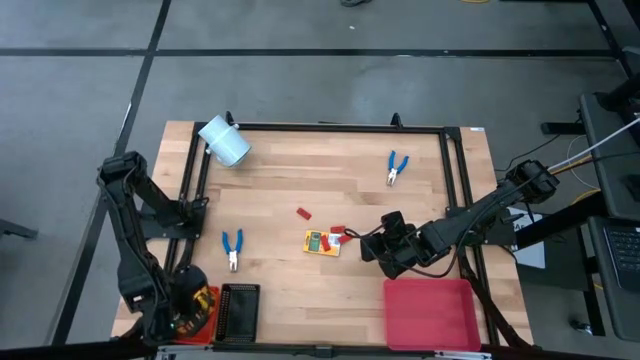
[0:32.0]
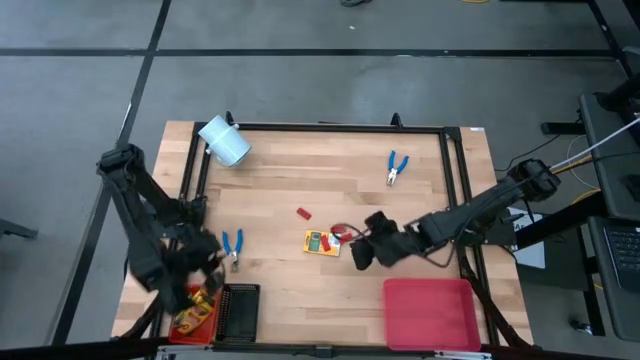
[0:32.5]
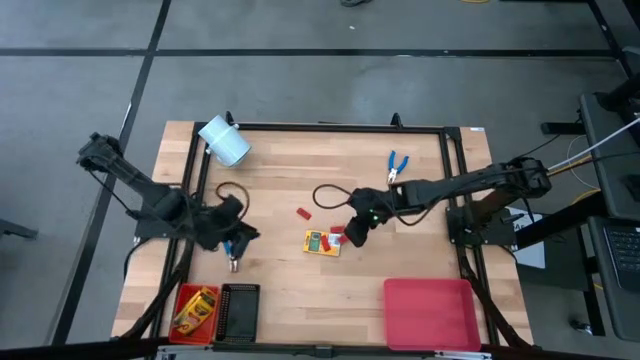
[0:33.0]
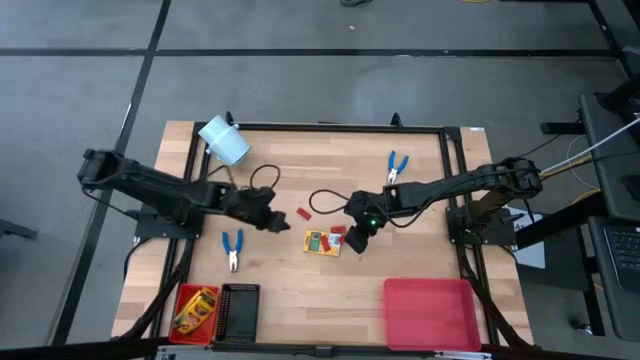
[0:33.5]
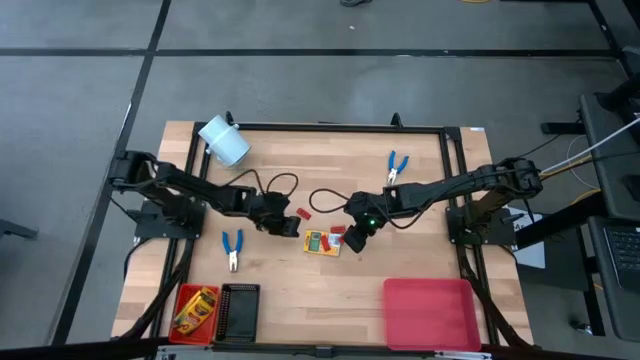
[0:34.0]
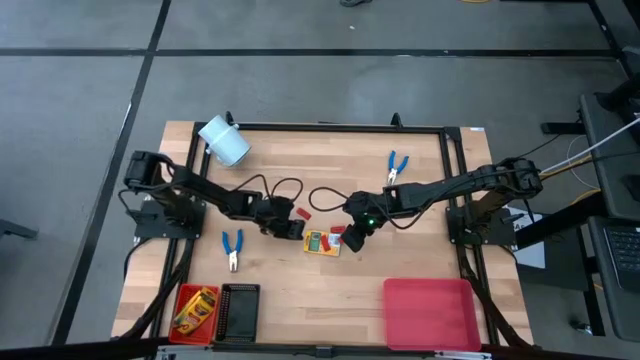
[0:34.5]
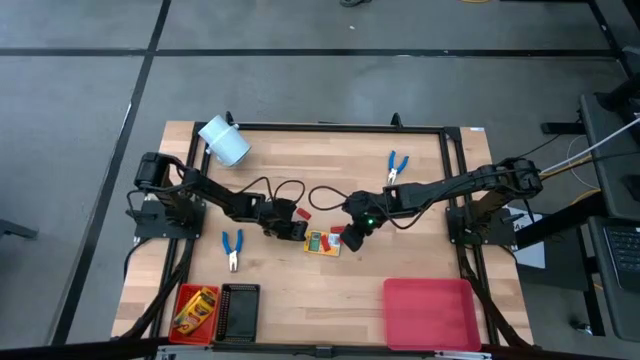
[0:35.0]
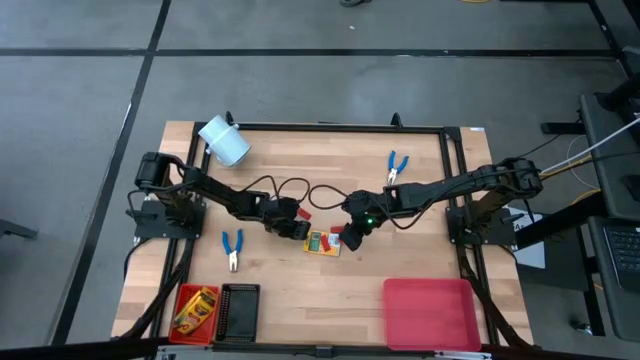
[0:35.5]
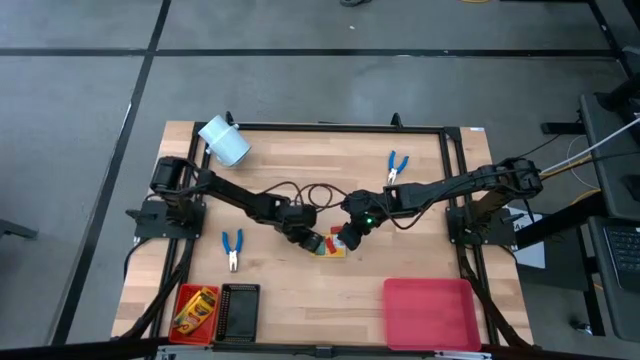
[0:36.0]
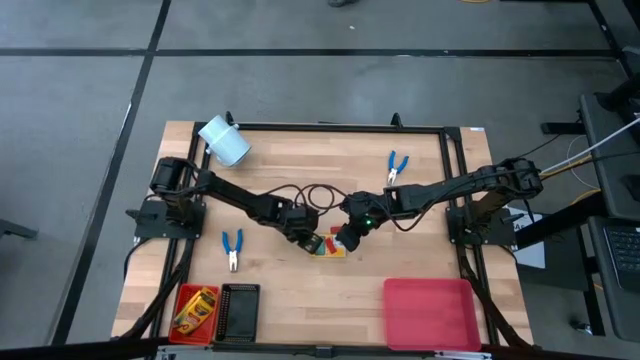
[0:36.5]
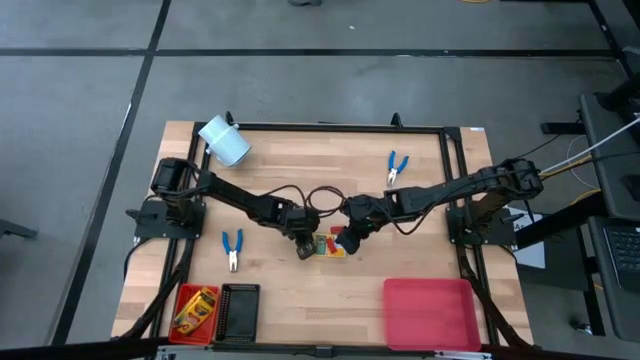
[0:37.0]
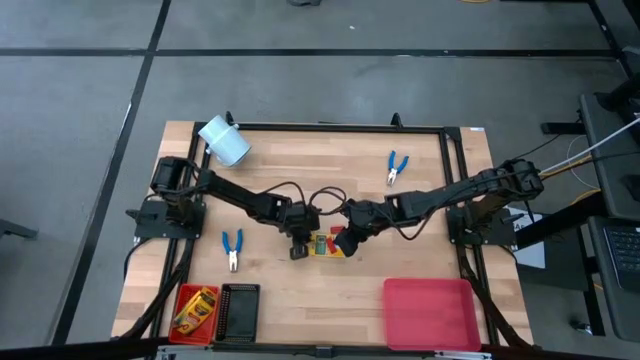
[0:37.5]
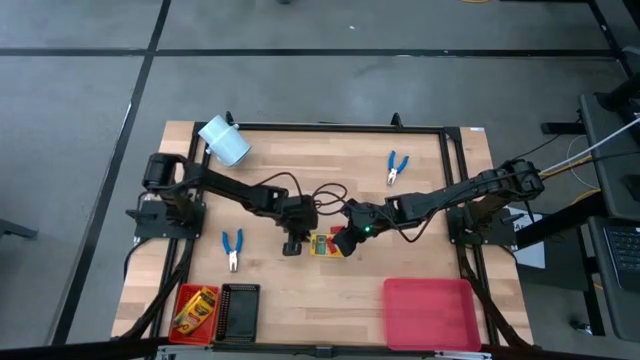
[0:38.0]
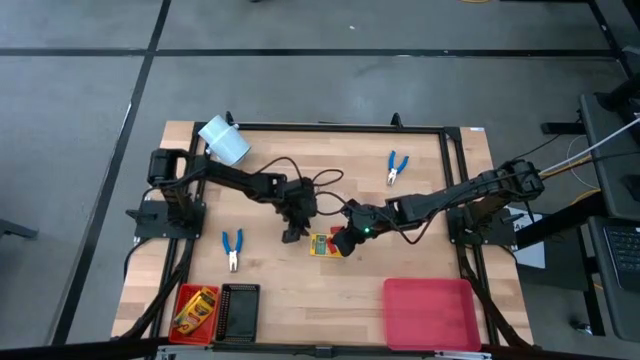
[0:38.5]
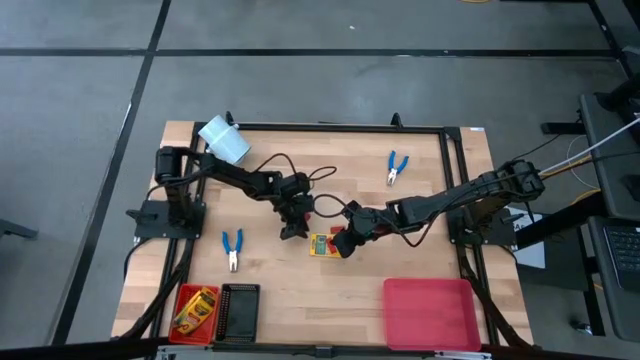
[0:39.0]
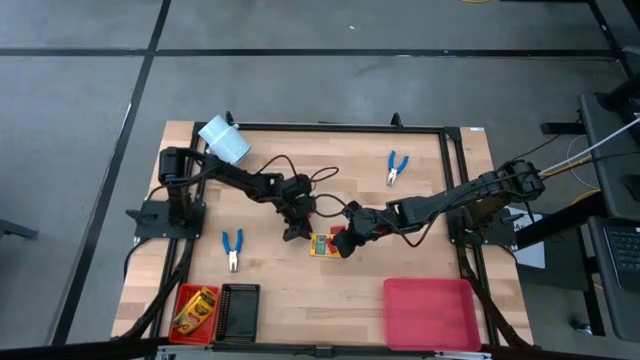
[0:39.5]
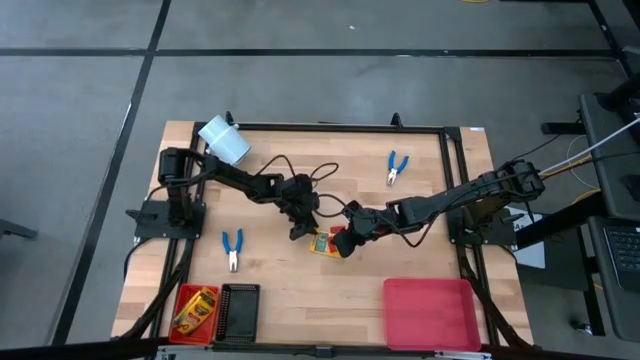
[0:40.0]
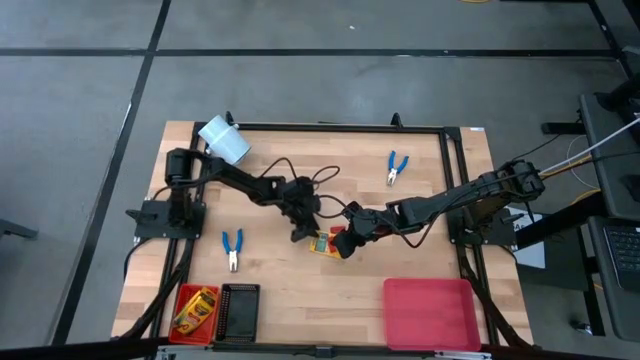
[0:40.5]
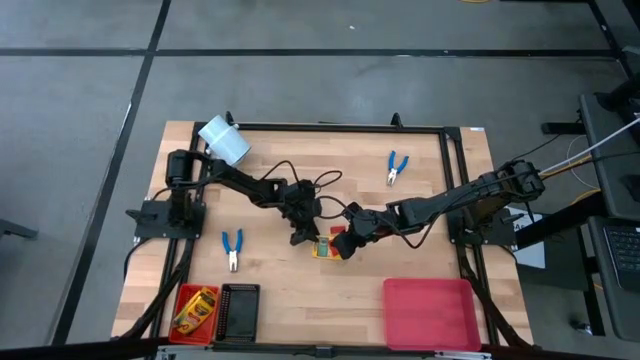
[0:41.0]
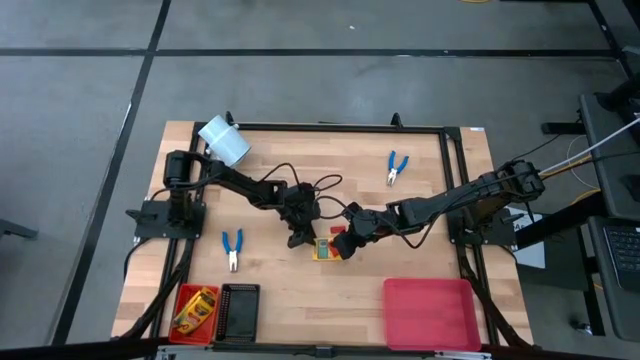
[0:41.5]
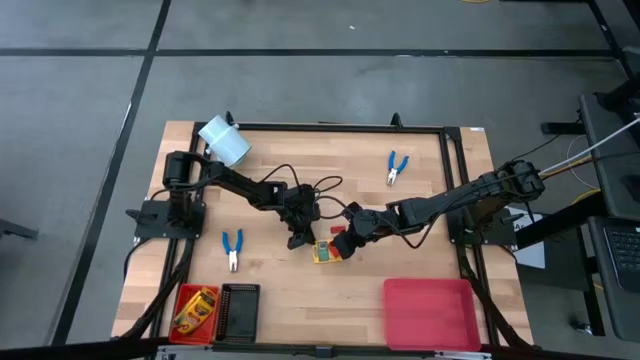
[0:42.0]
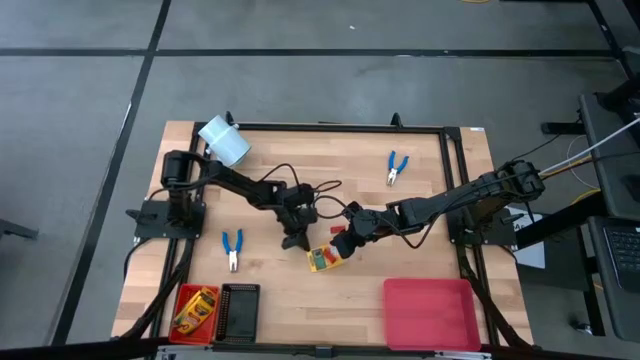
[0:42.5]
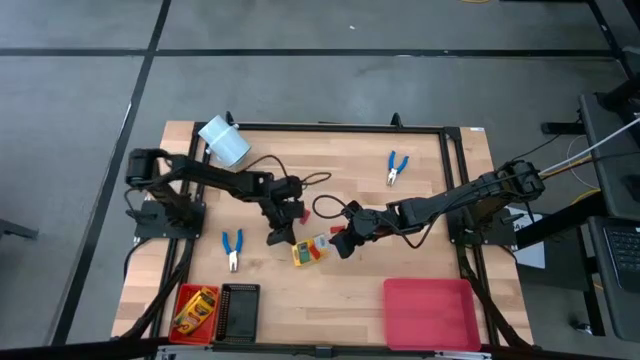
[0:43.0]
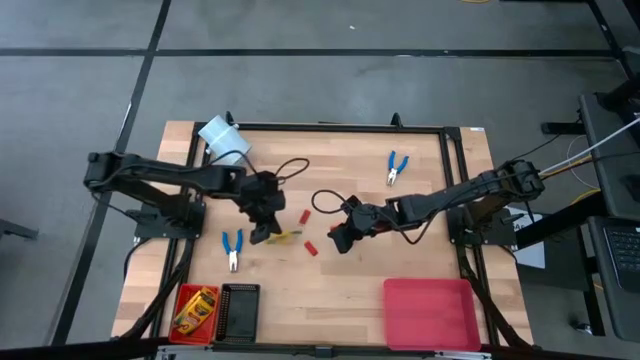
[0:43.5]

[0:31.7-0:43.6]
Task: Pick & Place School Supplies
Put the yellow crayon box into the red basket

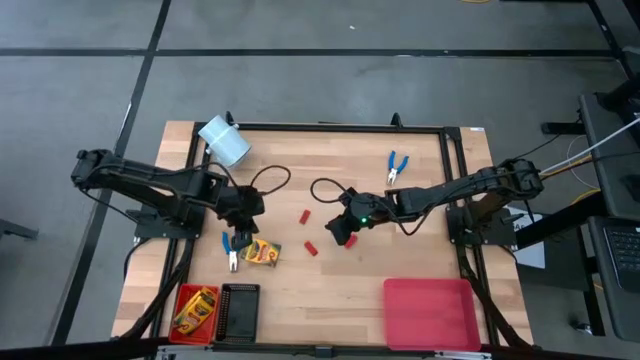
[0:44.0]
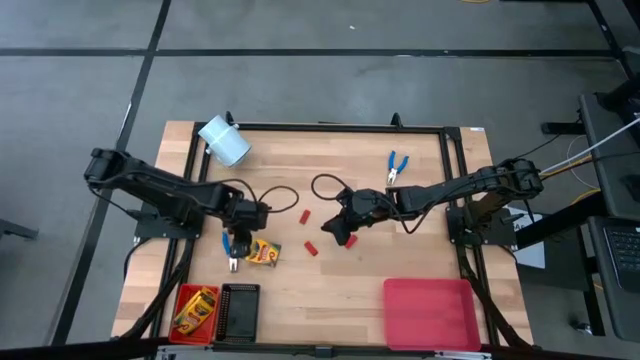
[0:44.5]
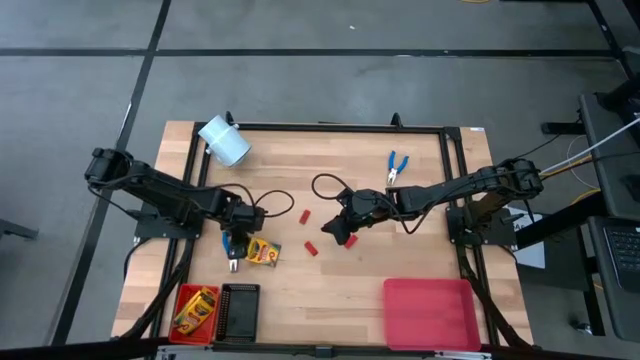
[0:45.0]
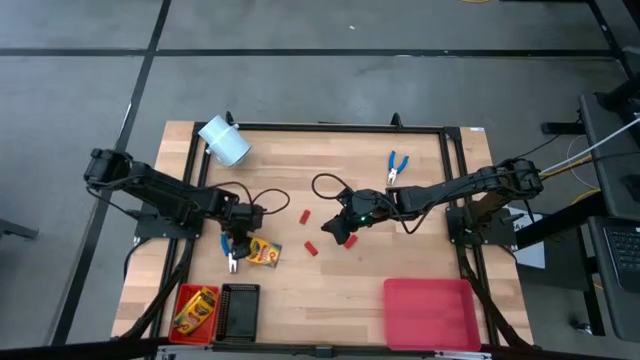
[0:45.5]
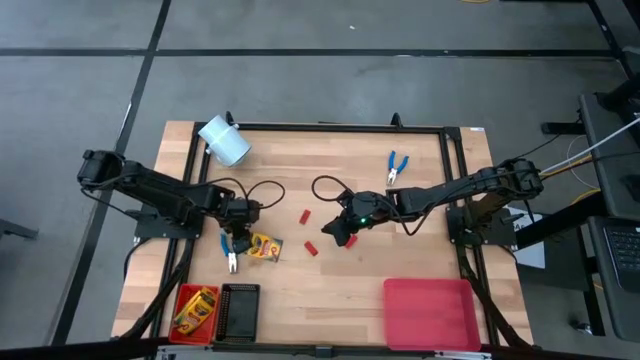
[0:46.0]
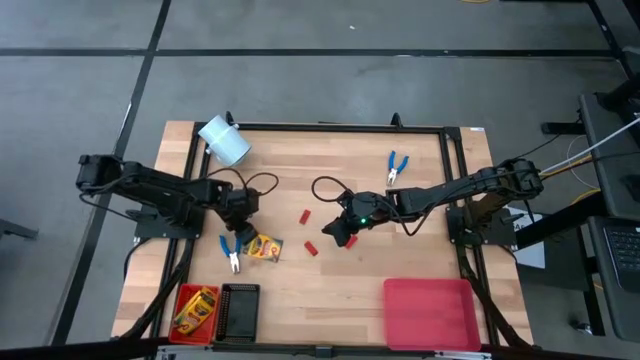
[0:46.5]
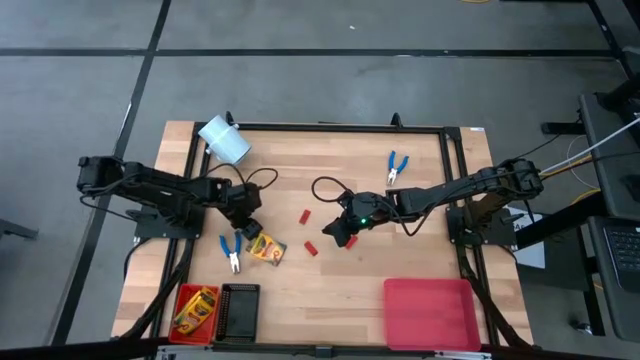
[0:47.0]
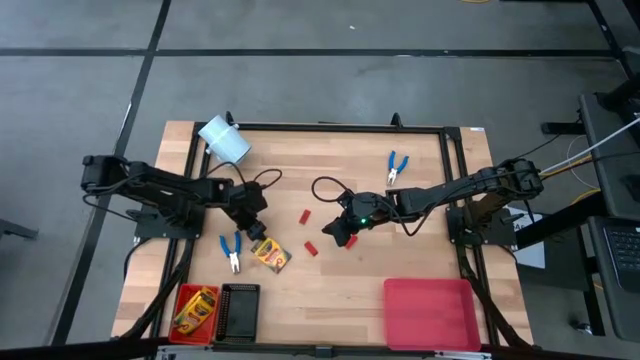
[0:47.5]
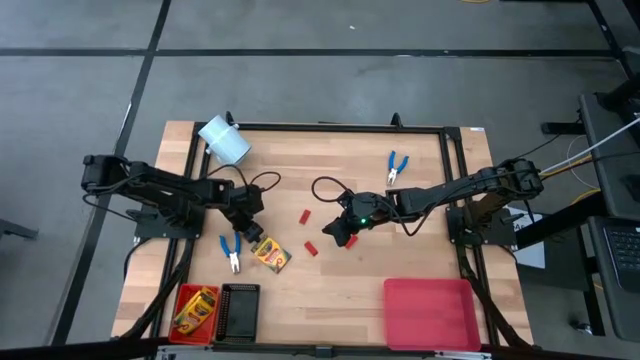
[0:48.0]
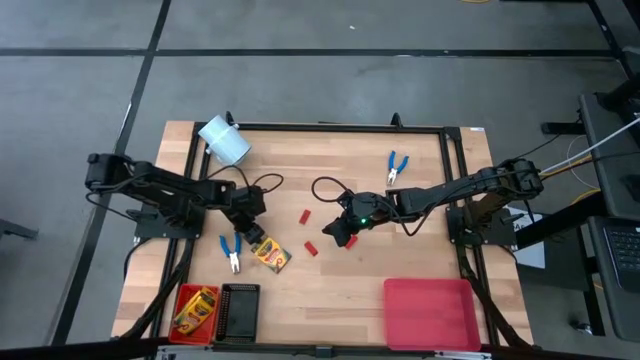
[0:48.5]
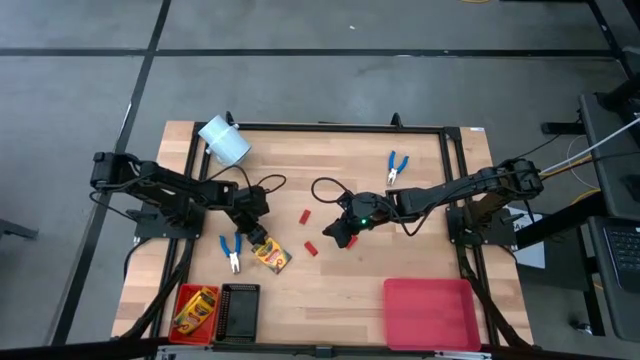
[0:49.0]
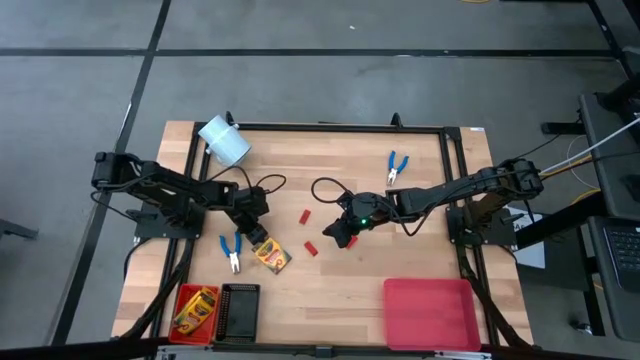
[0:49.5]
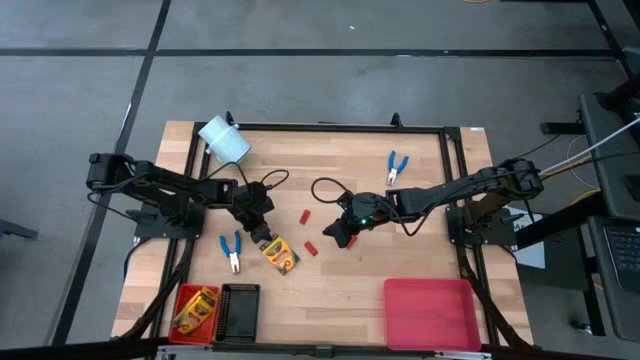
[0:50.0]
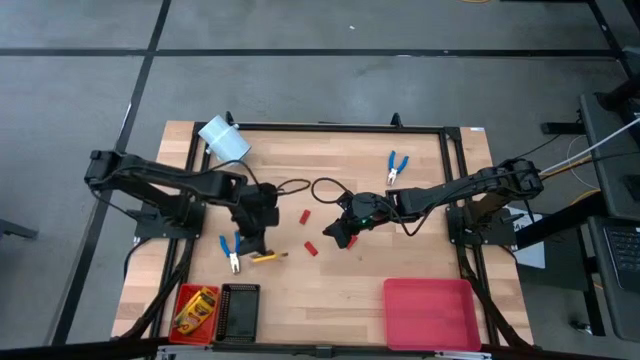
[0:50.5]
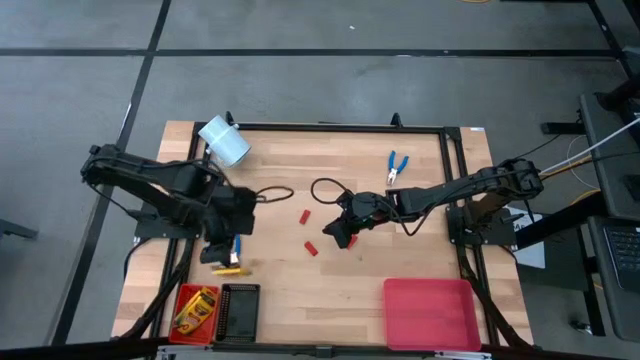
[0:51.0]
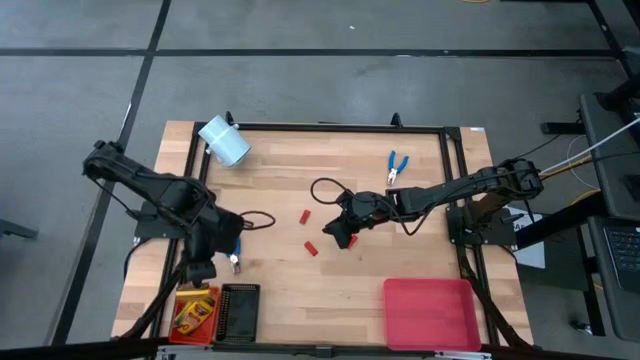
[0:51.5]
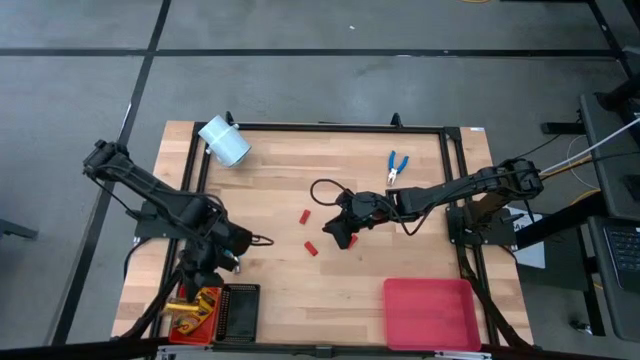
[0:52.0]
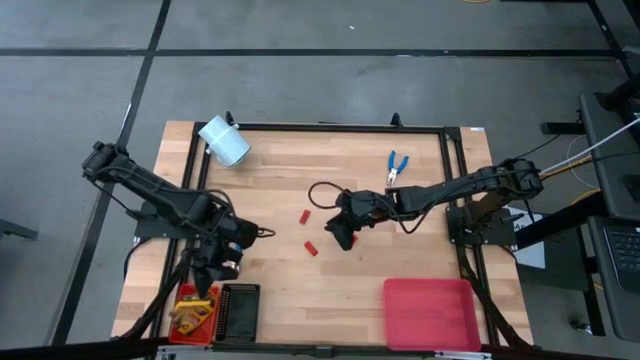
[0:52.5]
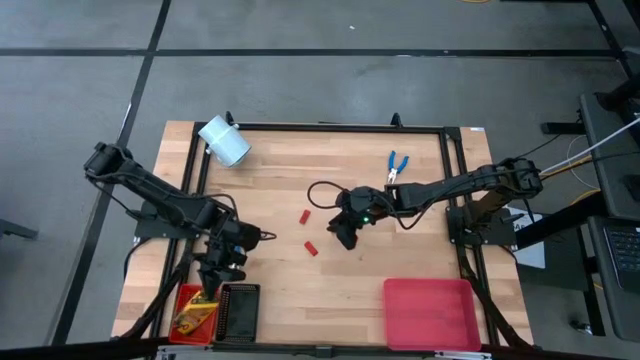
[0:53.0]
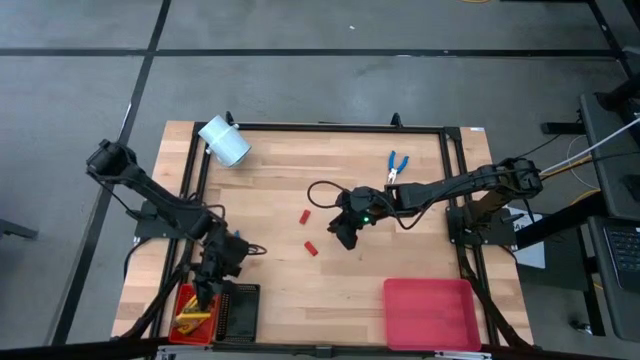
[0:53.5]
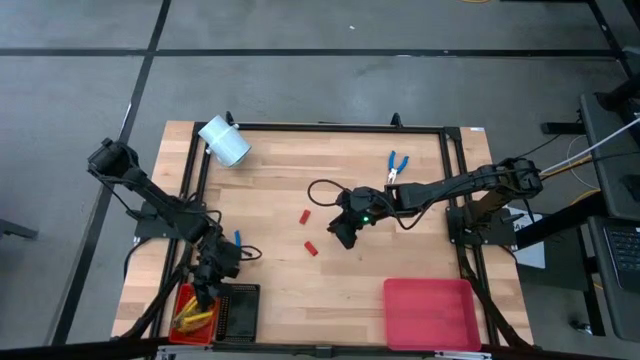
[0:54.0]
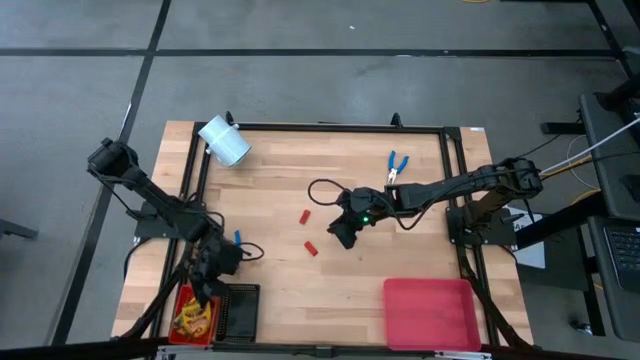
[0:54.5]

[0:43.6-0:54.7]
Put the yellow crayon box into the red basket
